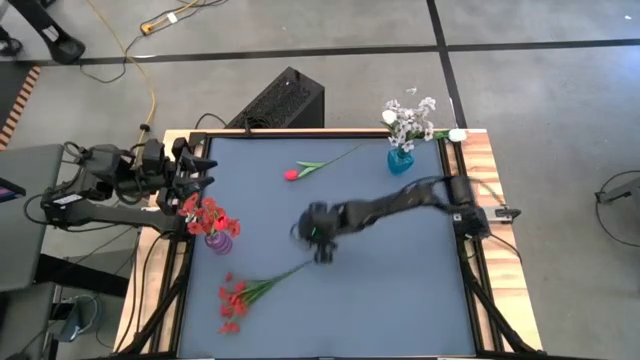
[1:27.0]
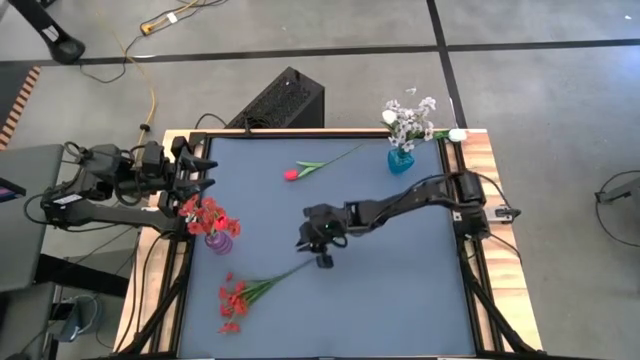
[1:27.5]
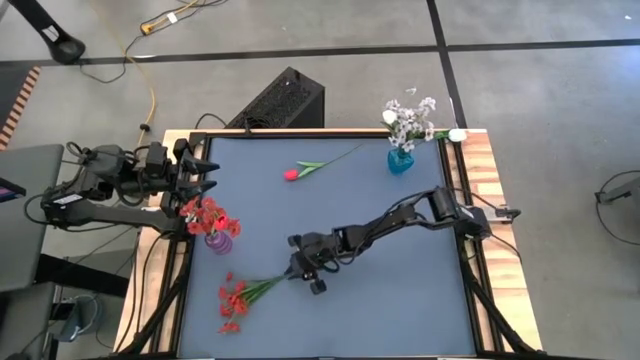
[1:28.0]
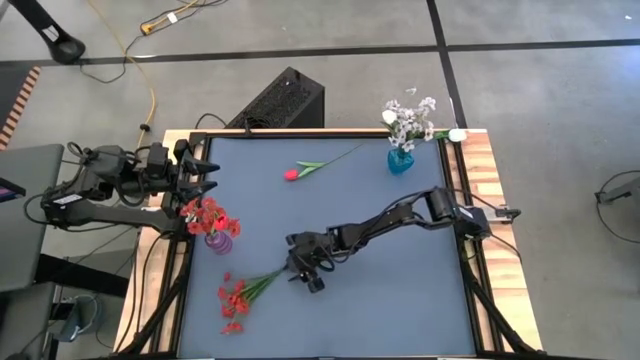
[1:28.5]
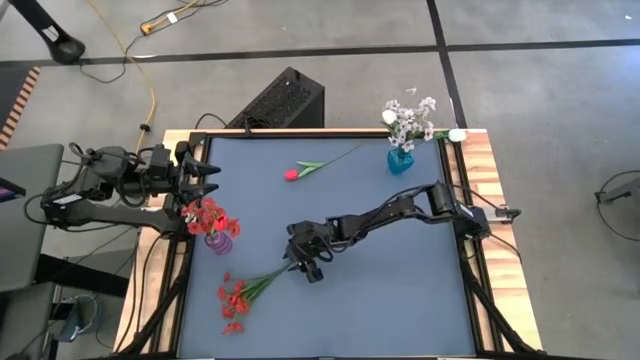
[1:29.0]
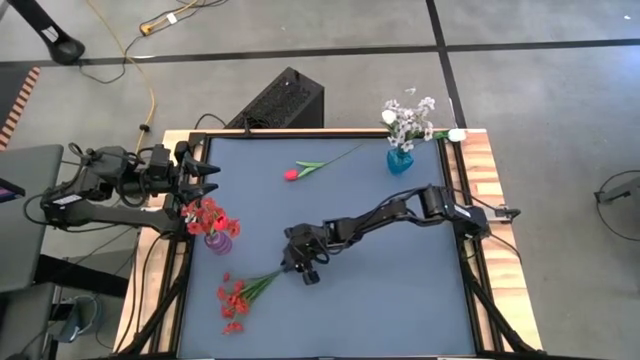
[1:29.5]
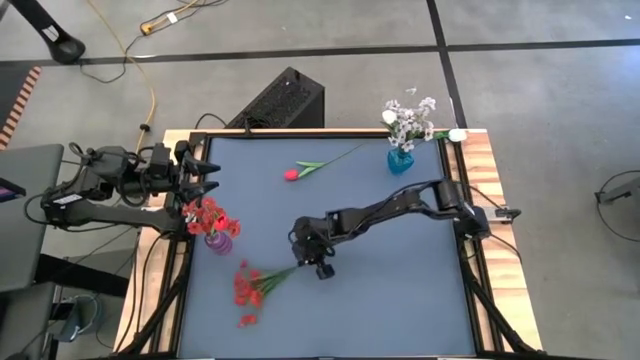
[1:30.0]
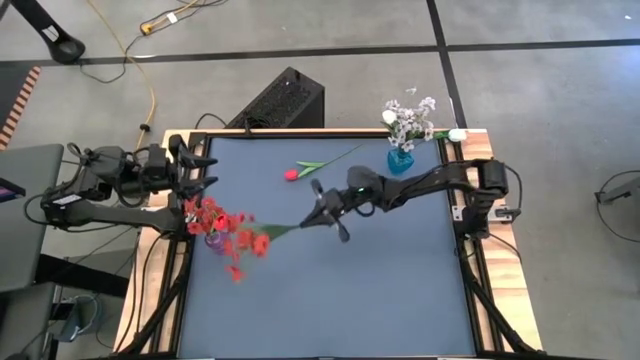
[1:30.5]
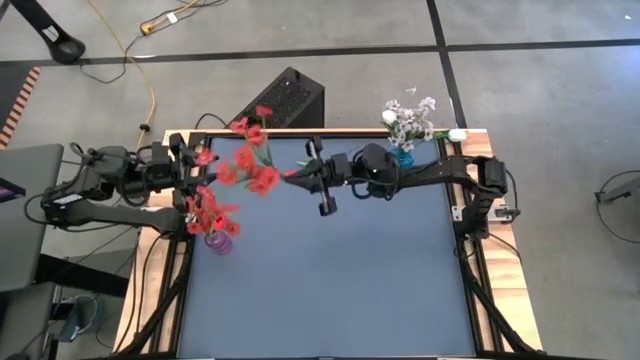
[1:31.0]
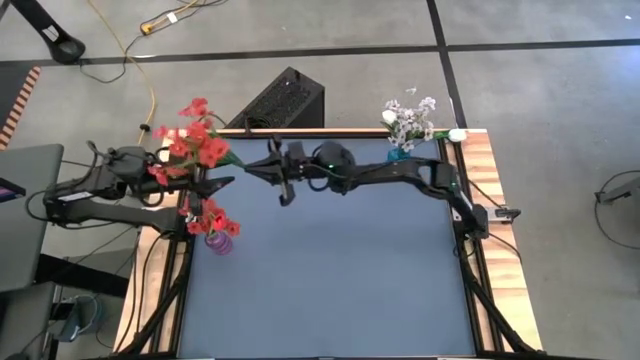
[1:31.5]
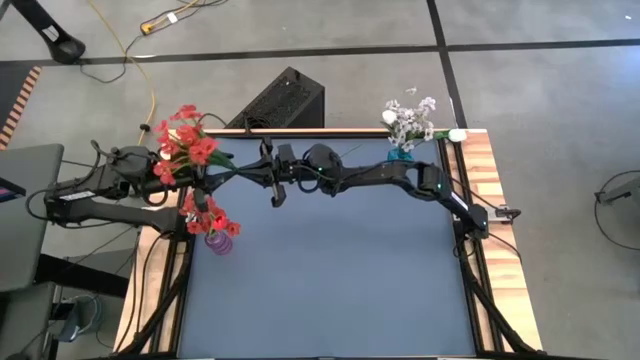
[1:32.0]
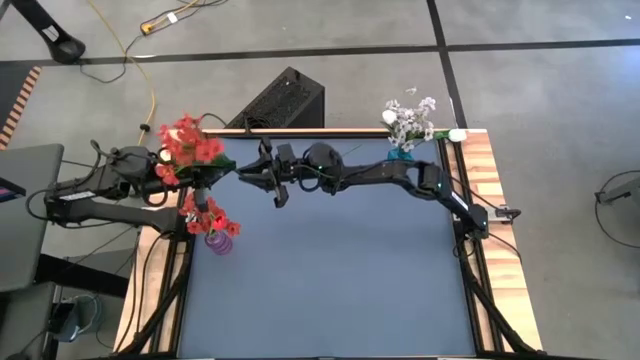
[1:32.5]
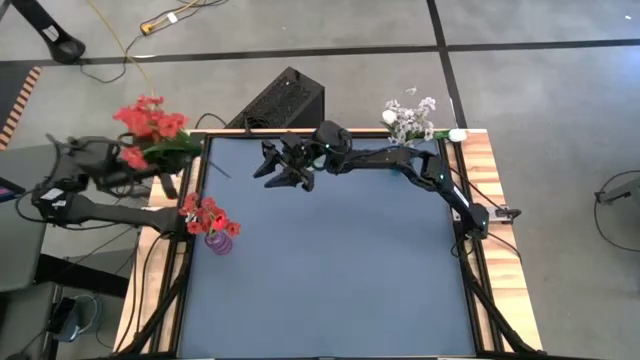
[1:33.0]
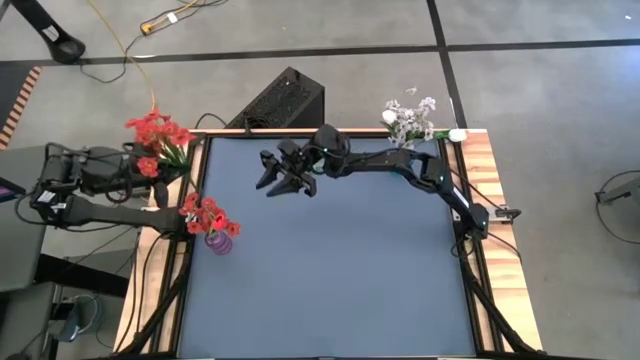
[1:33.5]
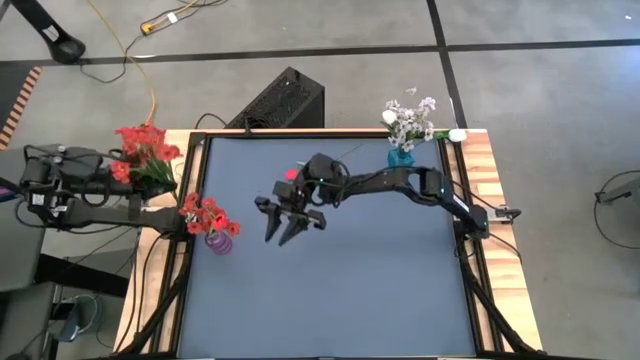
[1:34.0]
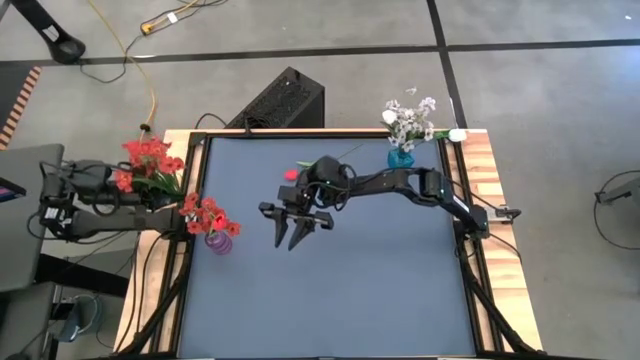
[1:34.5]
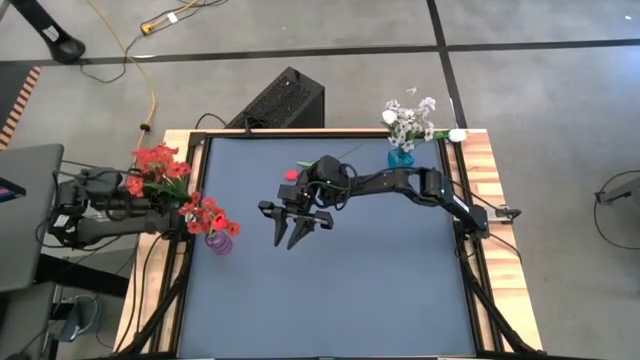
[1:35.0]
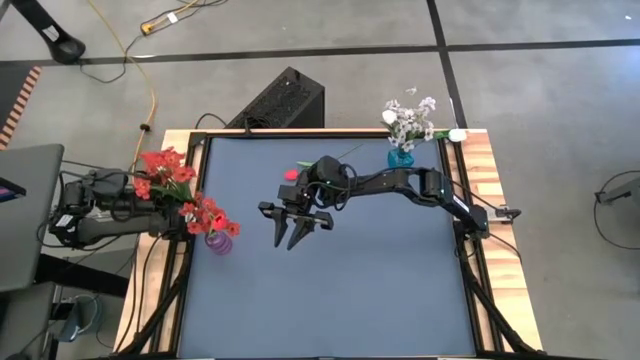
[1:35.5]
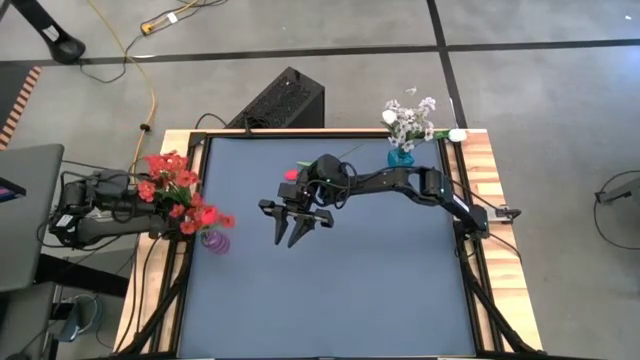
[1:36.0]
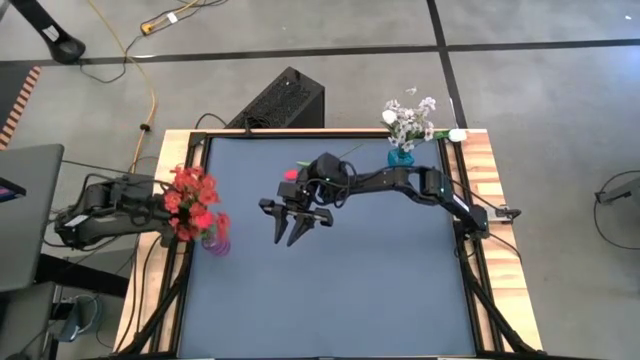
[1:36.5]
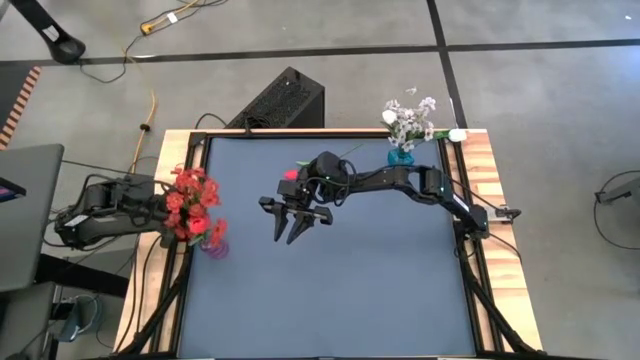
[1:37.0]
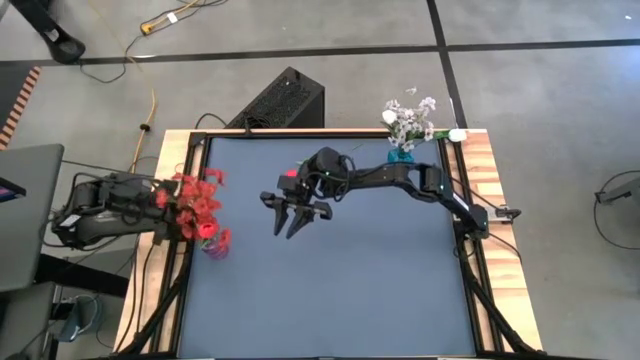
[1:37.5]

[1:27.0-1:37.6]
Task: Sort flowers into vase by color
Put the red flowers into the purple vase

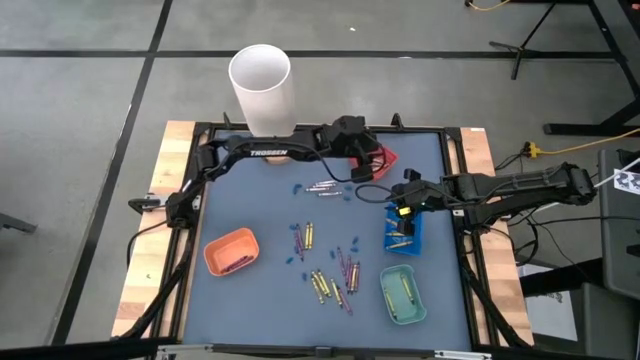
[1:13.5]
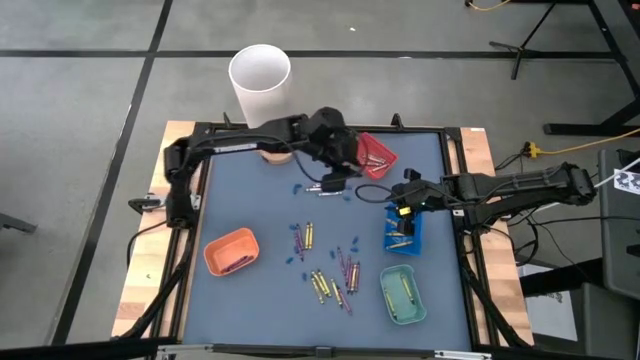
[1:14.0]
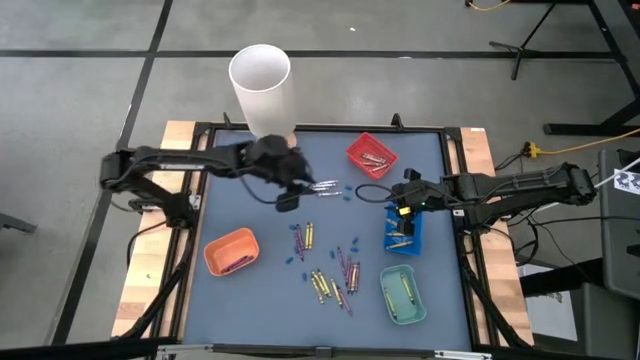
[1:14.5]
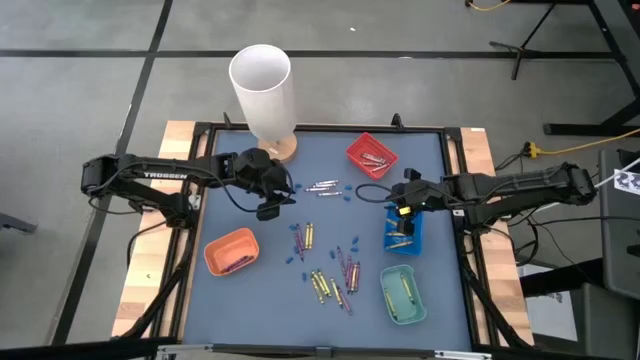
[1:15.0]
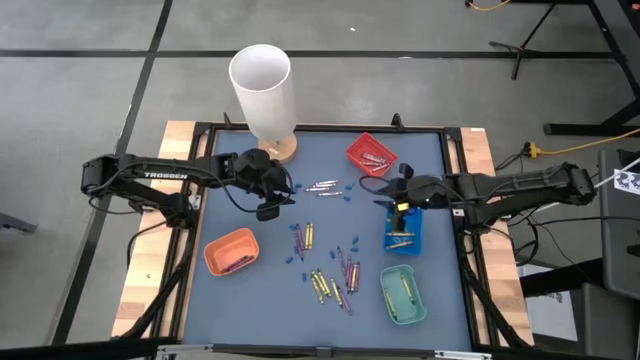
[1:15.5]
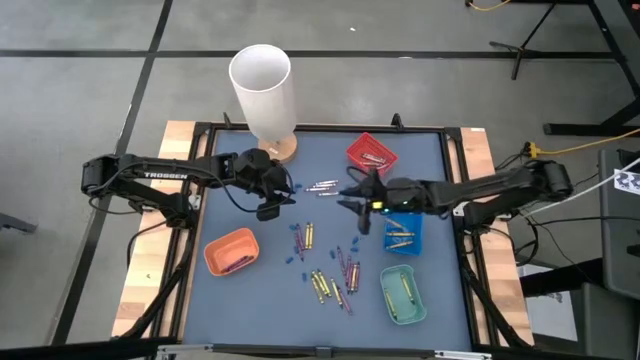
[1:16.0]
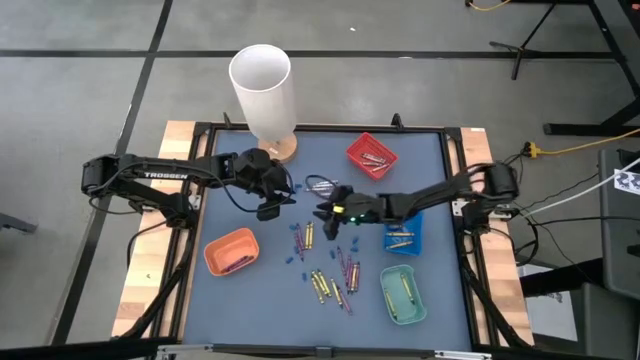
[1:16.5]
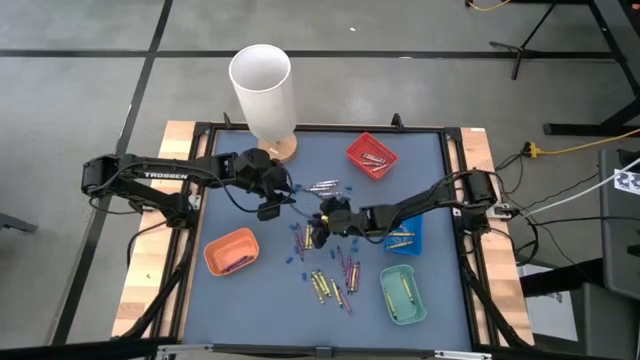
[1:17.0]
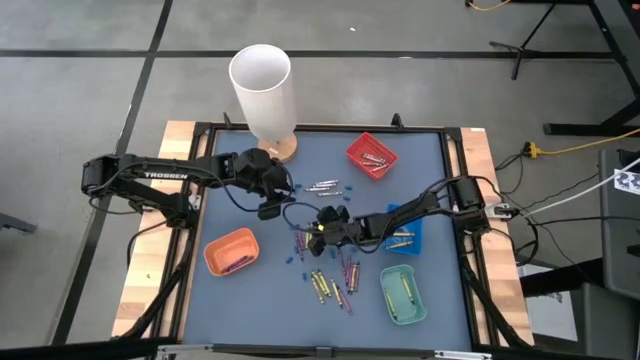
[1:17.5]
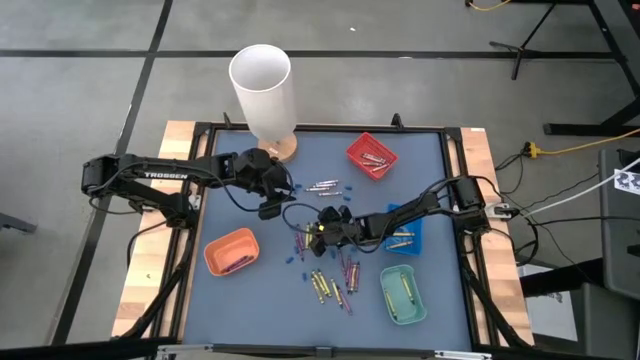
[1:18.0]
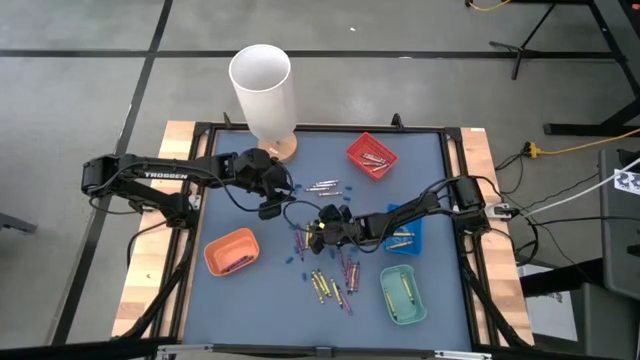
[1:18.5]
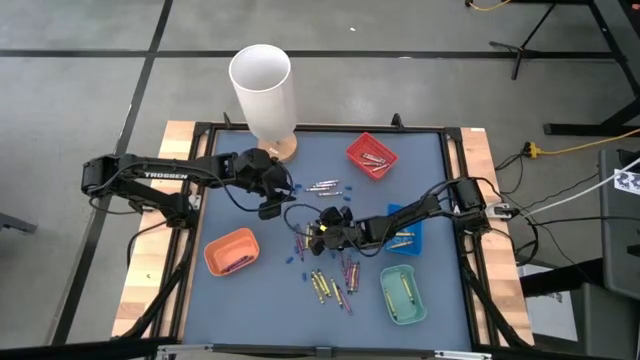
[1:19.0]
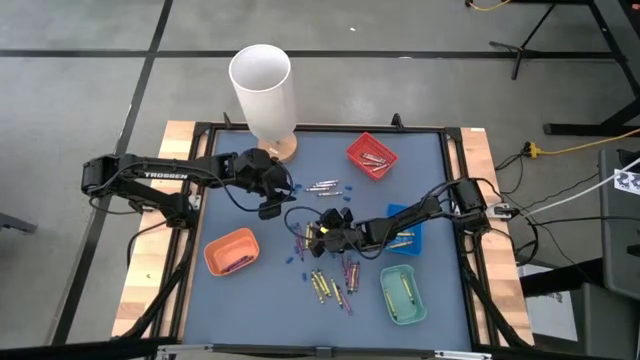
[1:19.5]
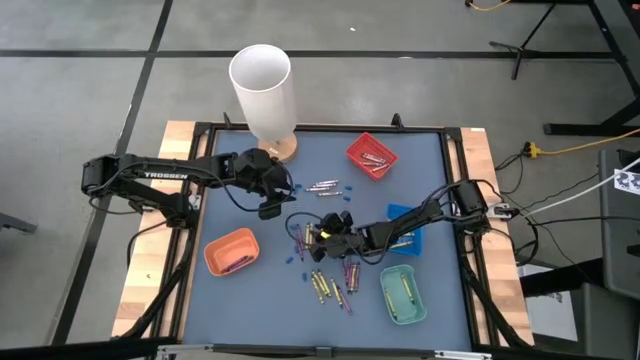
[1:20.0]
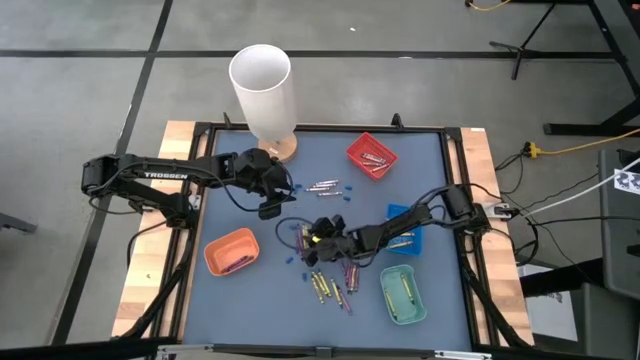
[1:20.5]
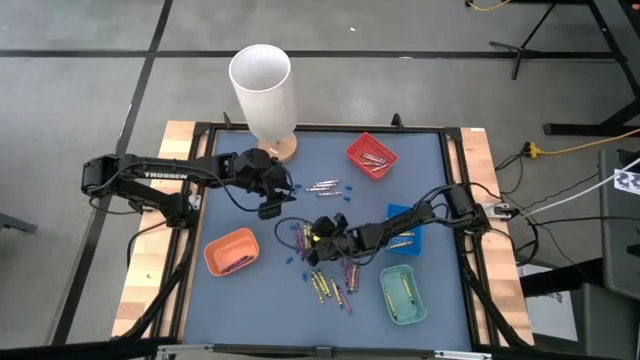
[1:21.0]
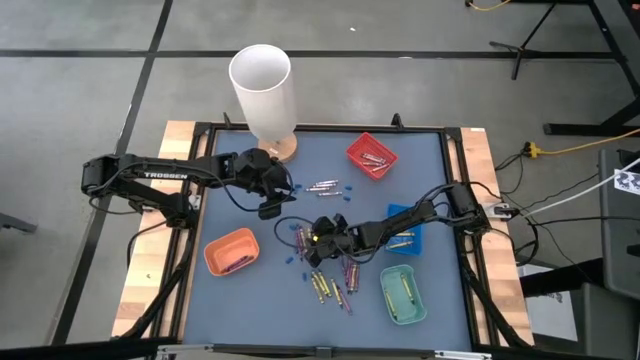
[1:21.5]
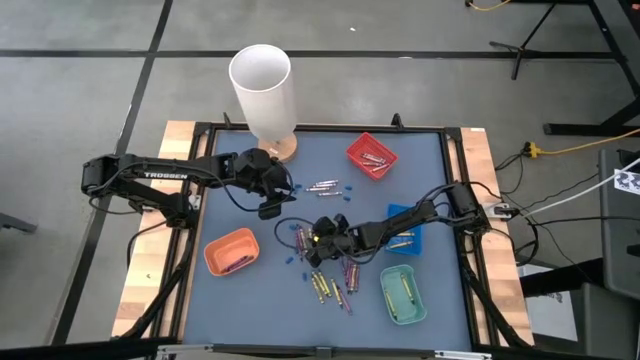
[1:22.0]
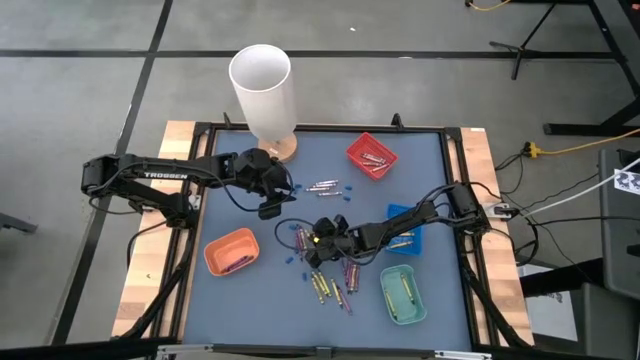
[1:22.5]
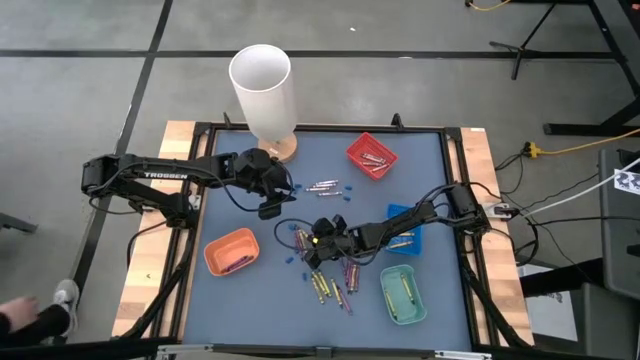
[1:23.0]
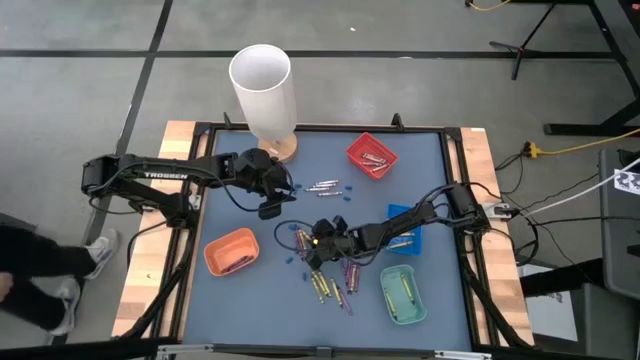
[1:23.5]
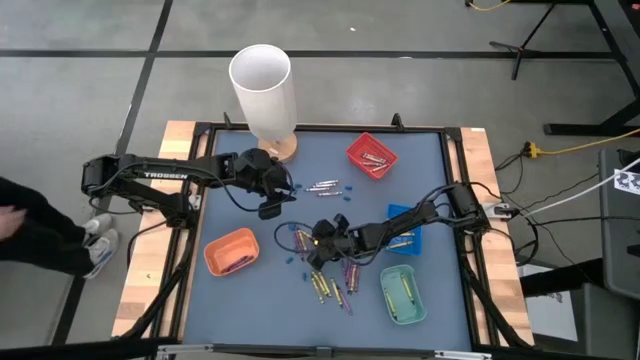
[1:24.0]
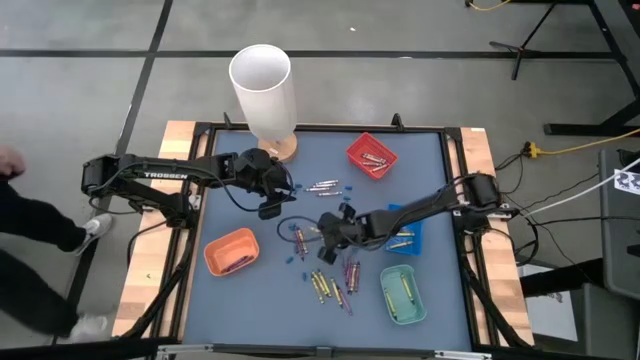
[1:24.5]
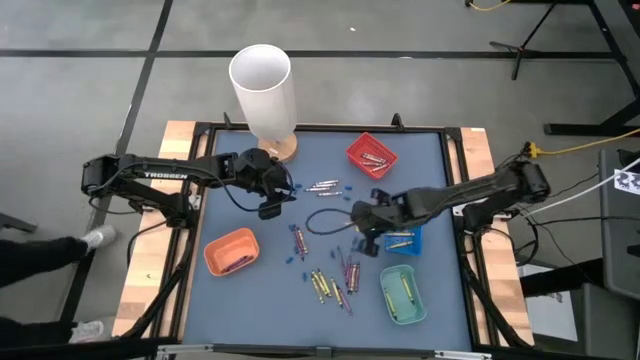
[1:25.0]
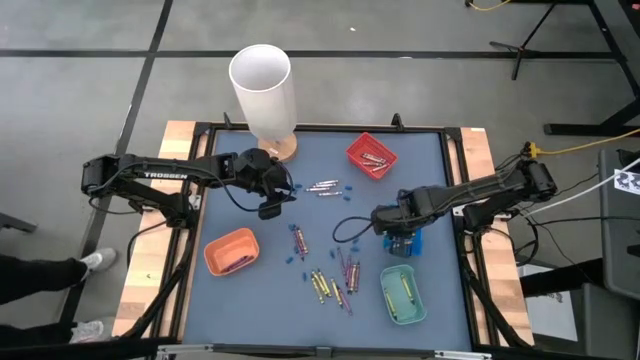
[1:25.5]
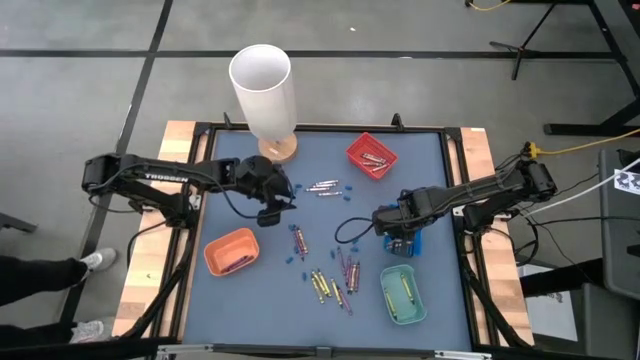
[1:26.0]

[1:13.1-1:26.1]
Task: Sort crayons
Put the yellow crayon into the blue bin
